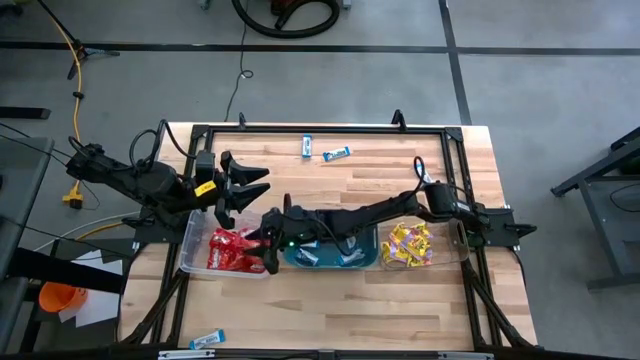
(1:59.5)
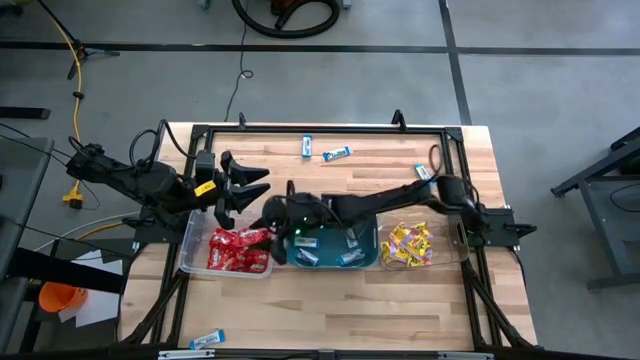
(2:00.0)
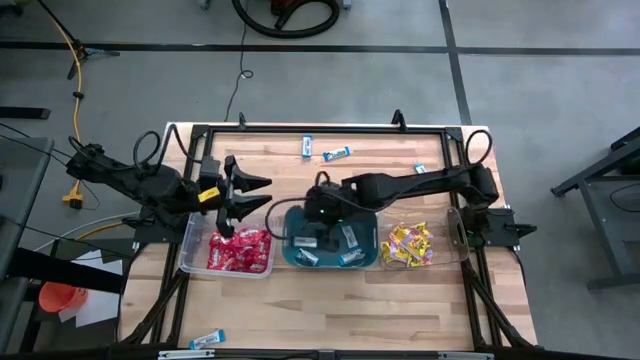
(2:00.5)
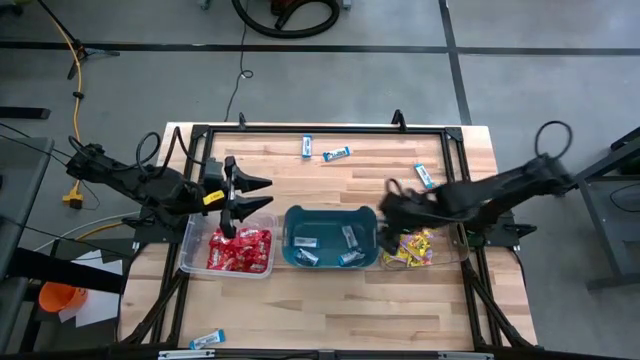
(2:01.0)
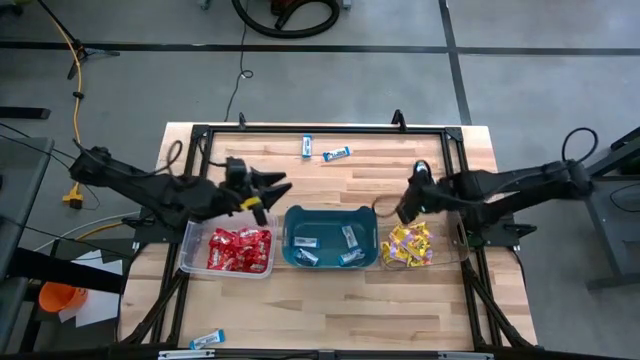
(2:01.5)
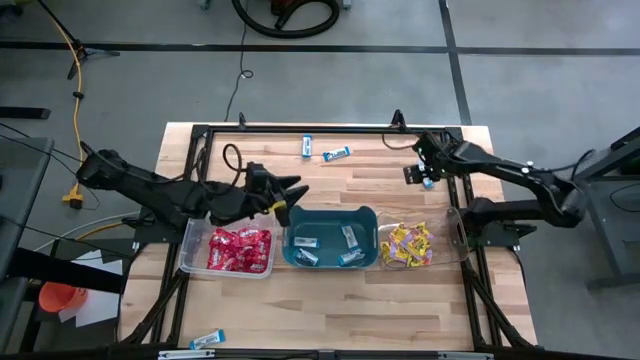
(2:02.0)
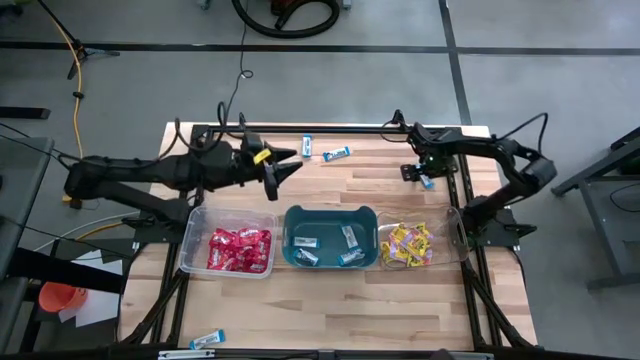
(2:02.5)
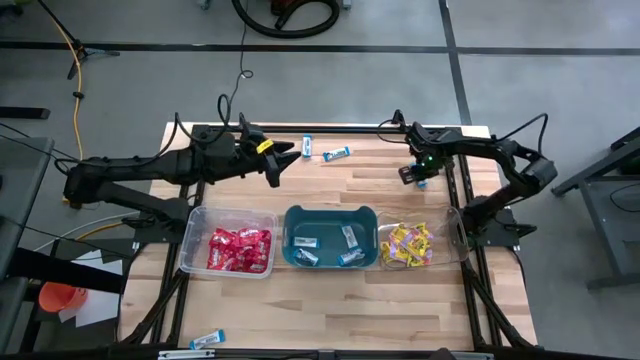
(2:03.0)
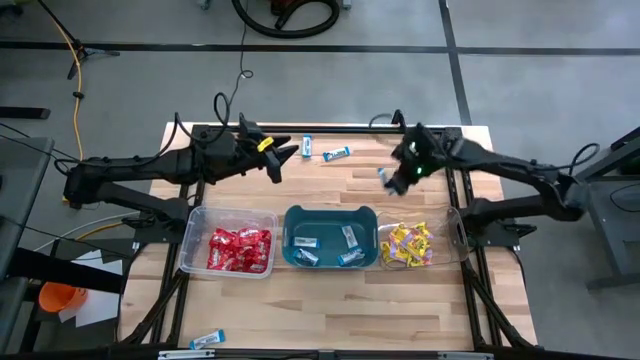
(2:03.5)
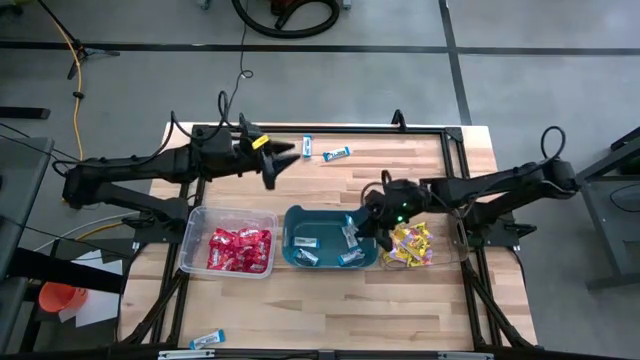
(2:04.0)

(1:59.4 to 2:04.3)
Task: Sort candy
Put the white chocolate into the blue bin

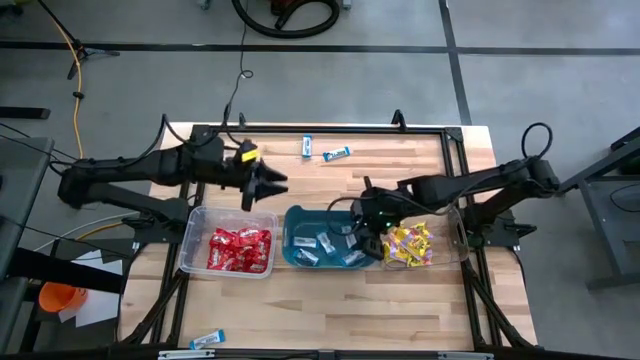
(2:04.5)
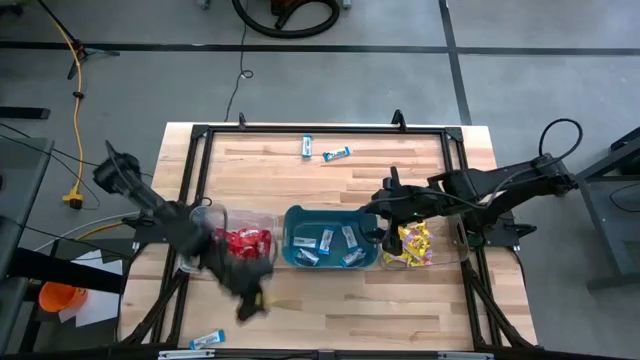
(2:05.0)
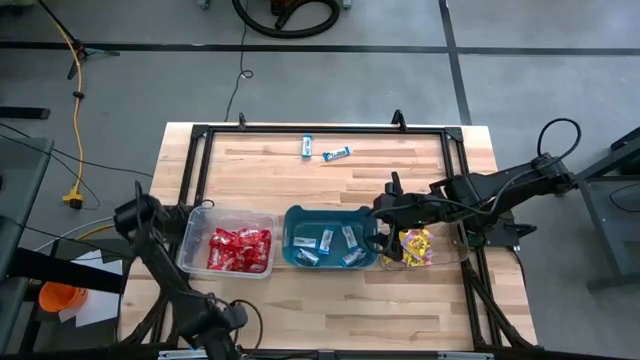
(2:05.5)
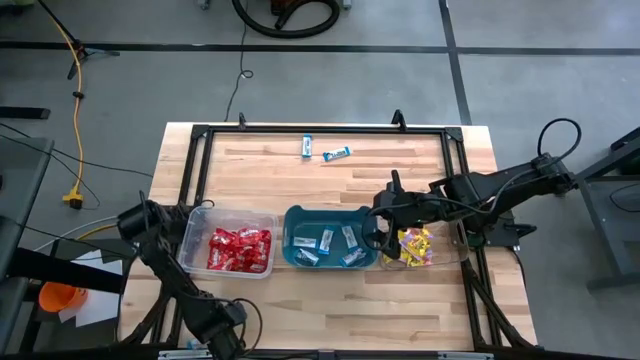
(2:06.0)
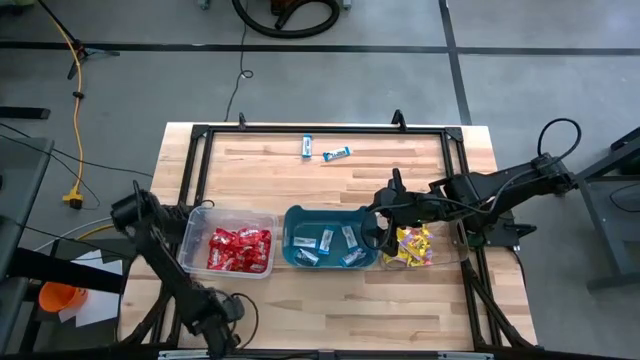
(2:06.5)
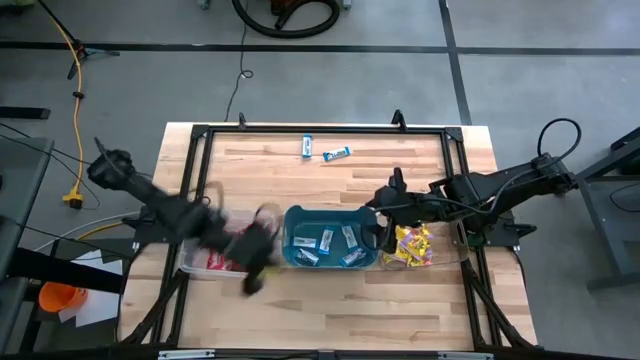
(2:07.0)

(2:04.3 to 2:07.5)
Put the white chocolate into the blue bin

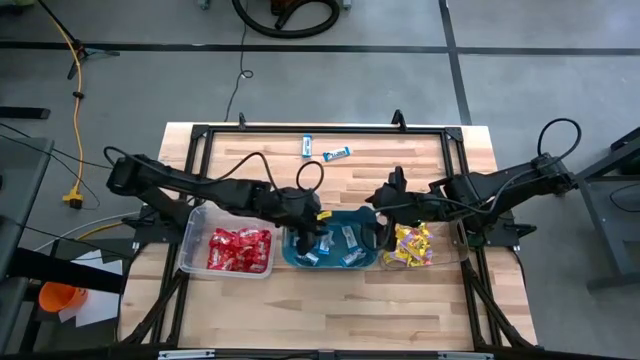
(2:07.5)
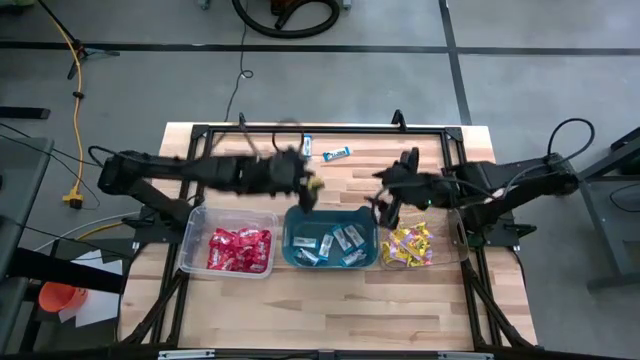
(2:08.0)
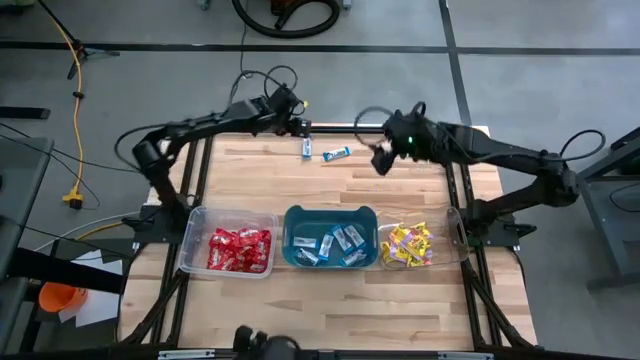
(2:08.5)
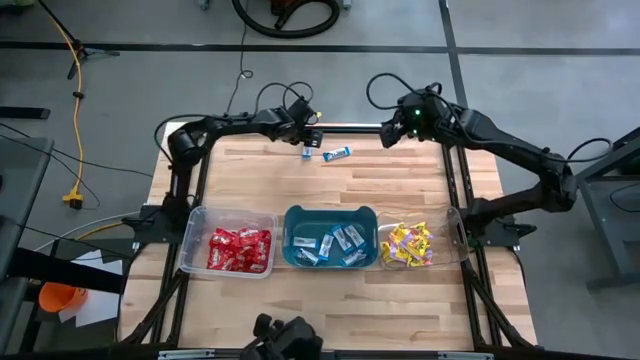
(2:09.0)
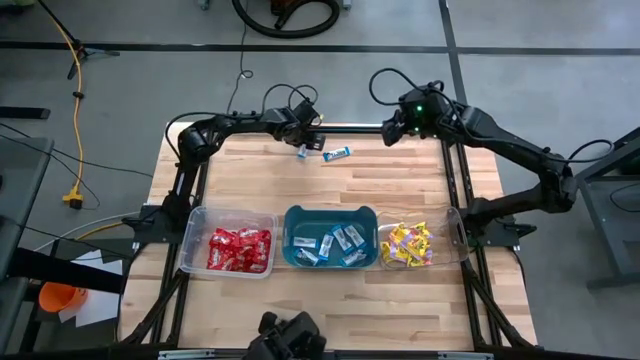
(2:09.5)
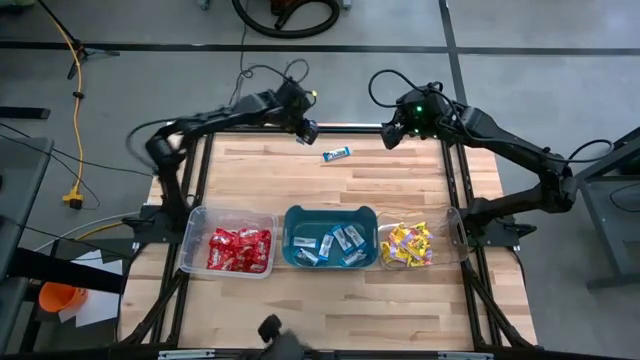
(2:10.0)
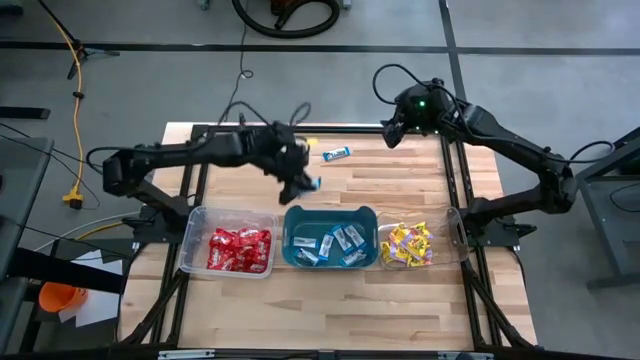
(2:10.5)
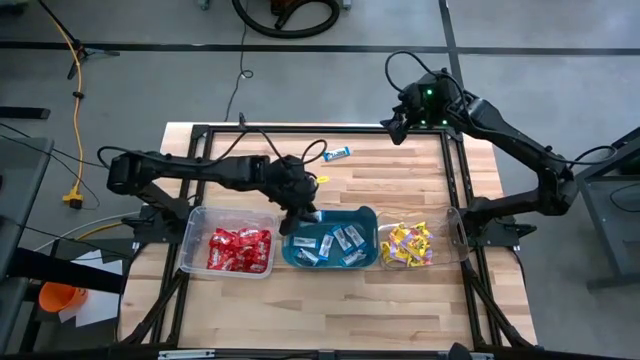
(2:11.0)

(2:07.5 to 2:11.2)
Put the white chocolate into the blue bin

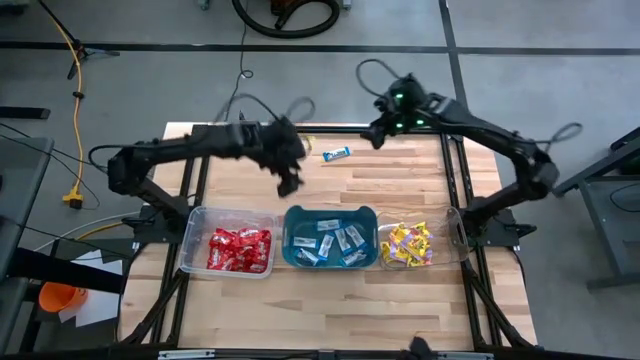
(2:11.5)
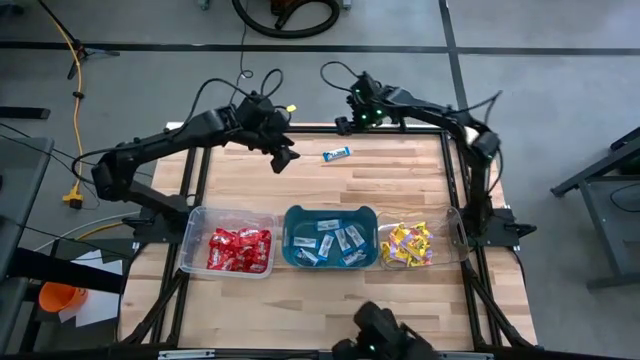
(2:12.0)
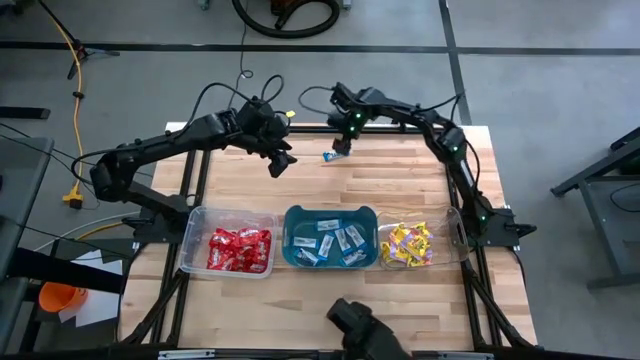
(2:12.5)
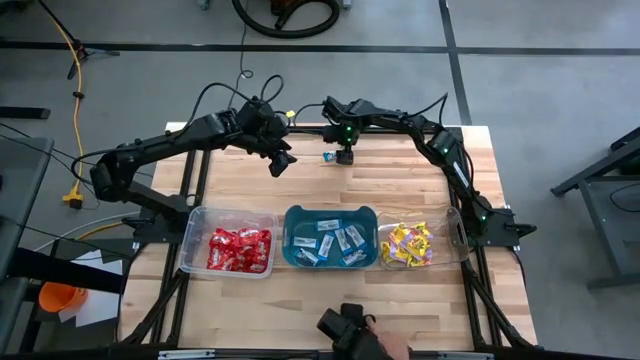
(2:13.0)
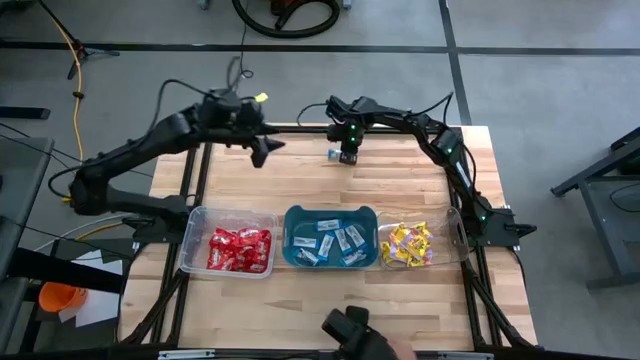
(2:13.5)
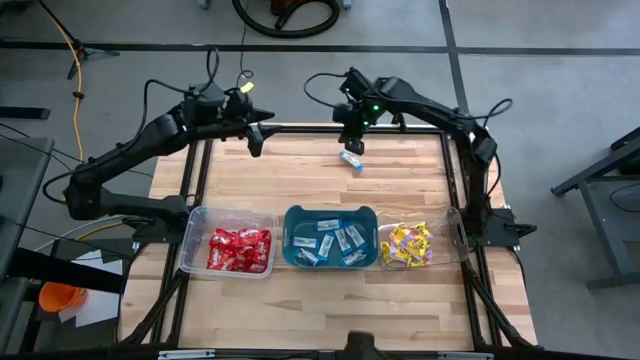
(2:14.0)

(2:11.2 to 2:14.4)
Put the white chocolate into the blue bin

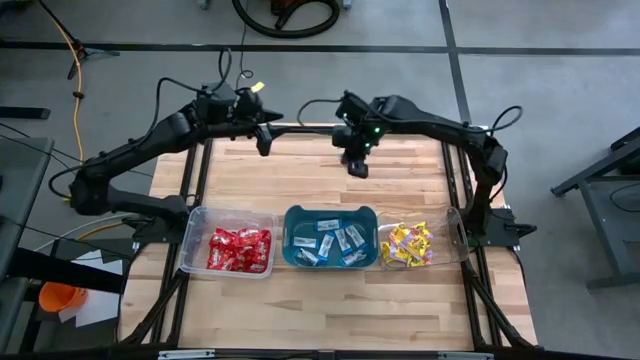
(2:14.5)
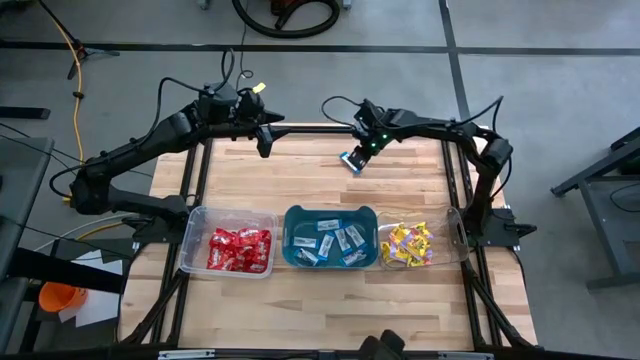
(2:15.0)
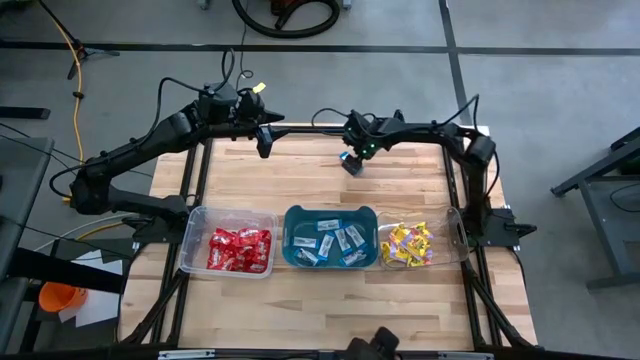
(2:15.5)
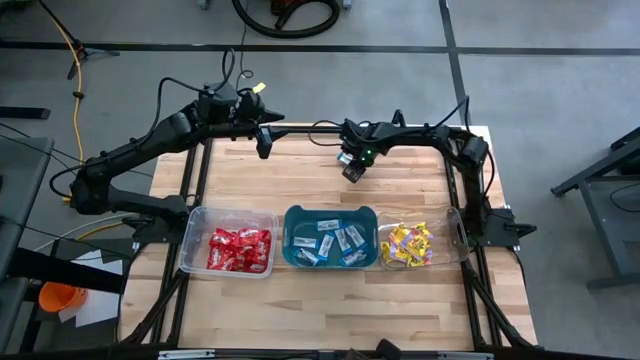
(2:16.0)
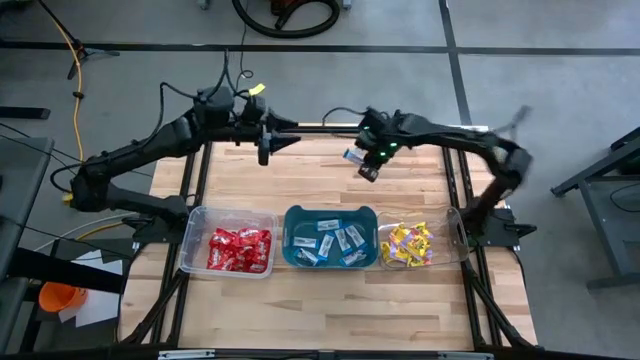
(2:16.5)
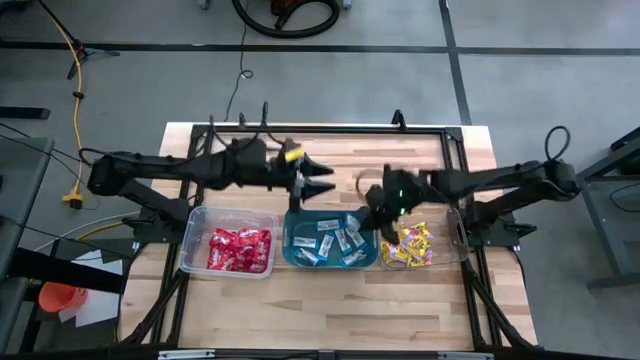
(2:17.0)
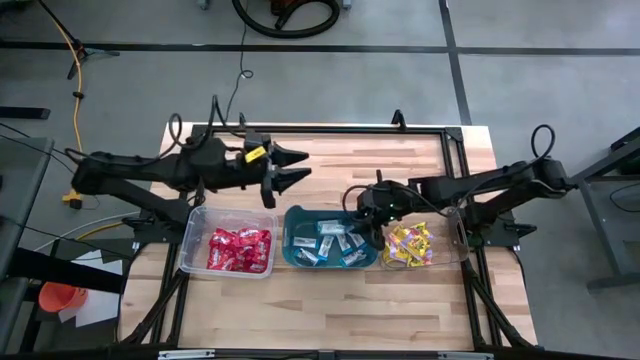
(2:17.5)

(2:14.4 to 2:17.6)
Put the white chocolate into the blue bin
